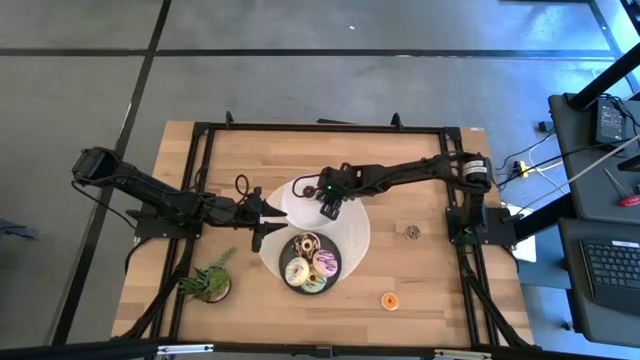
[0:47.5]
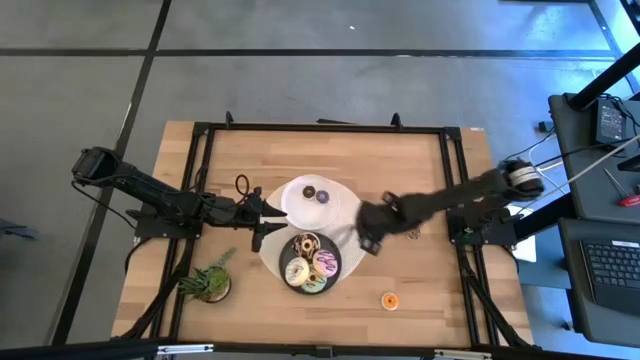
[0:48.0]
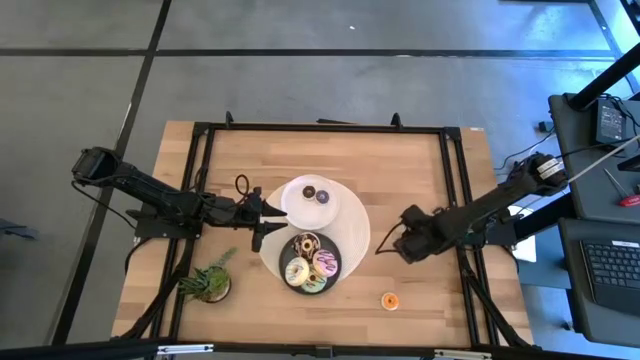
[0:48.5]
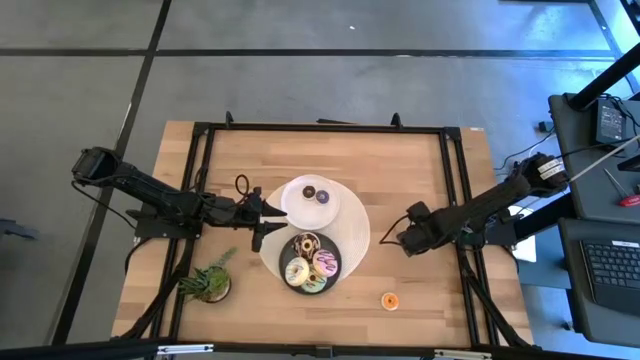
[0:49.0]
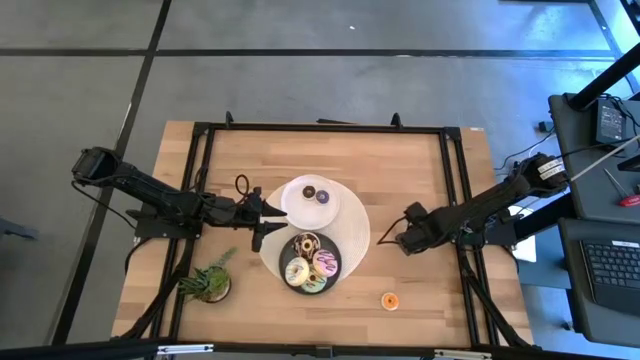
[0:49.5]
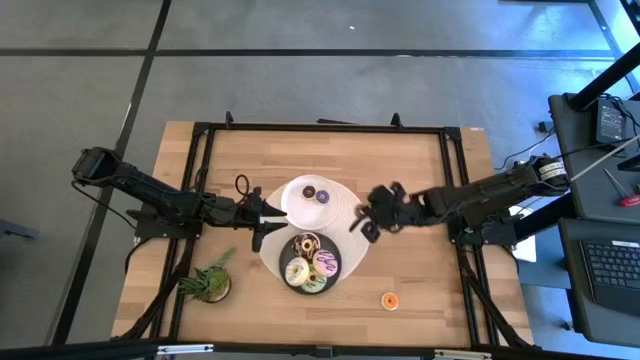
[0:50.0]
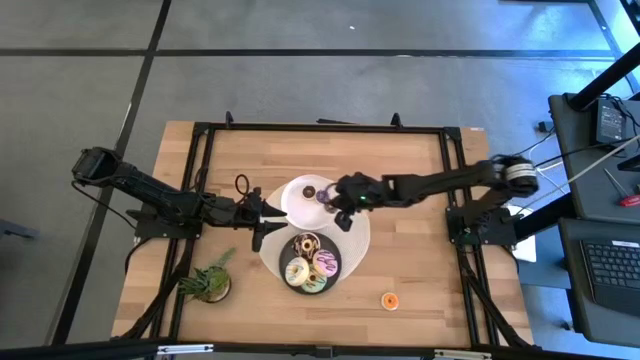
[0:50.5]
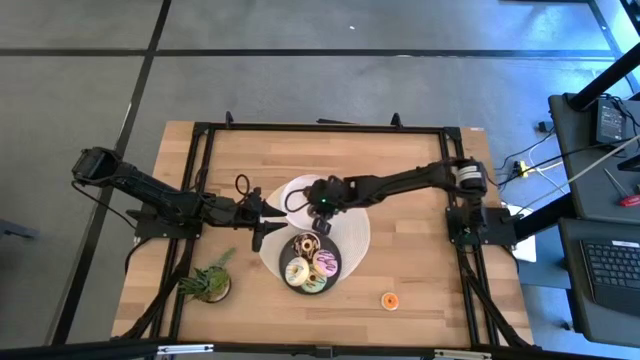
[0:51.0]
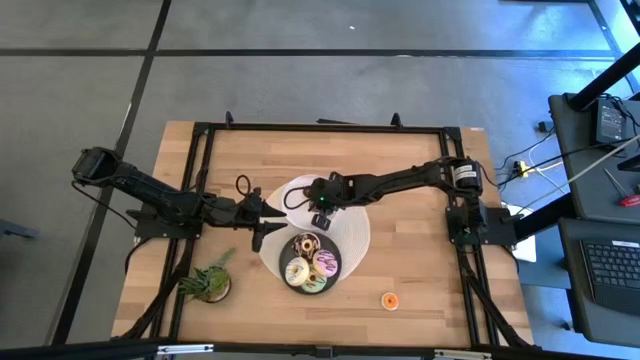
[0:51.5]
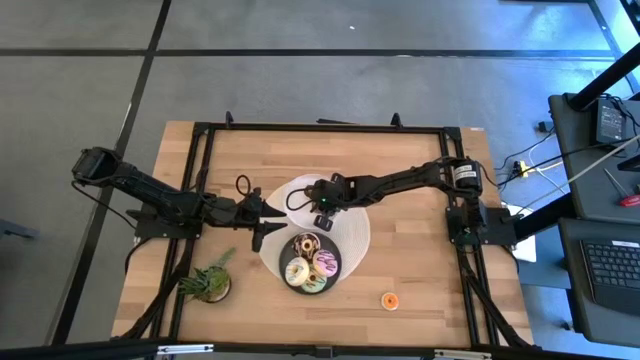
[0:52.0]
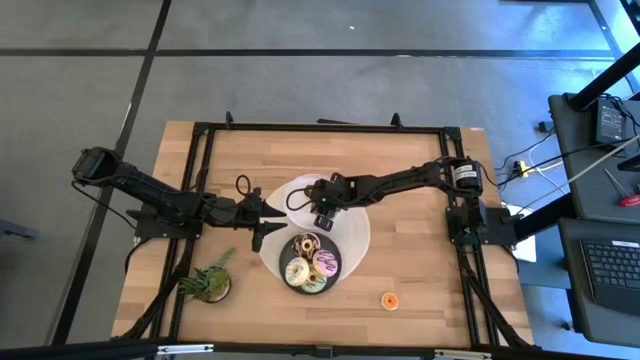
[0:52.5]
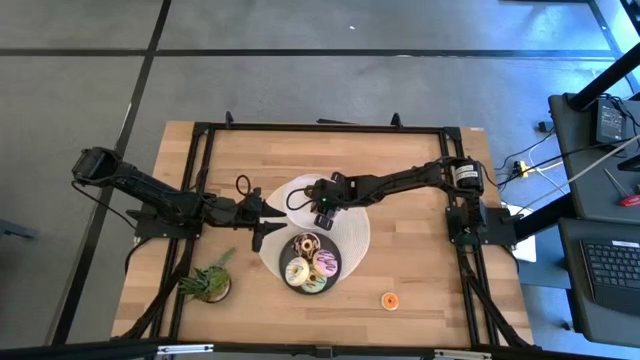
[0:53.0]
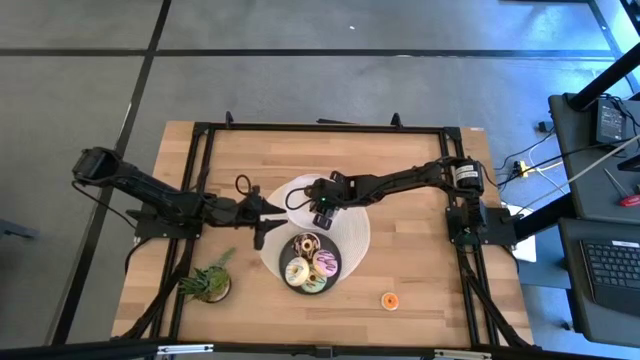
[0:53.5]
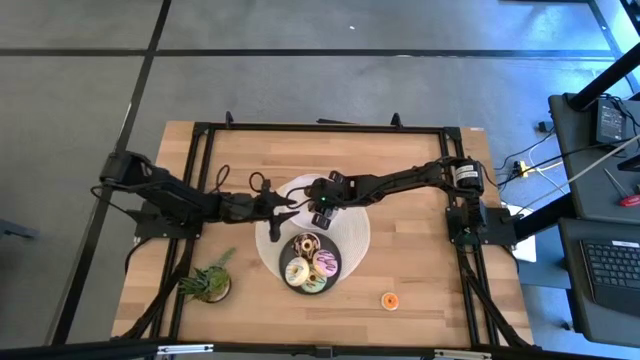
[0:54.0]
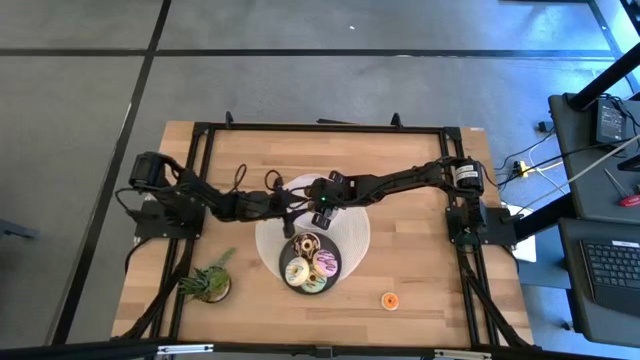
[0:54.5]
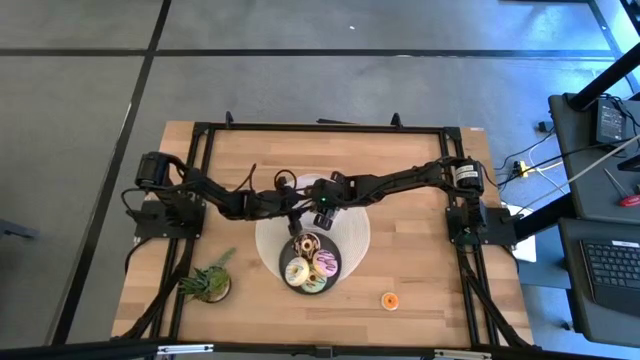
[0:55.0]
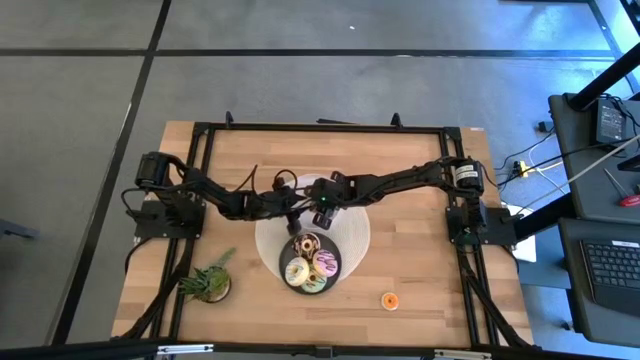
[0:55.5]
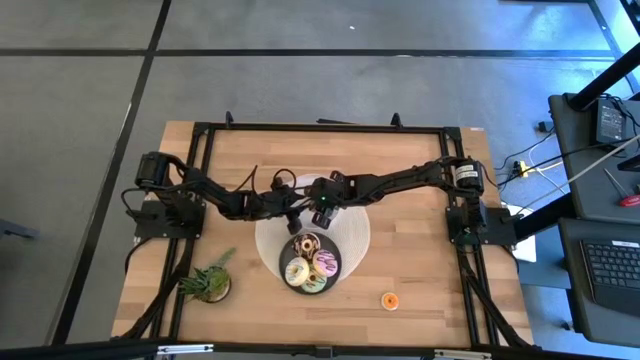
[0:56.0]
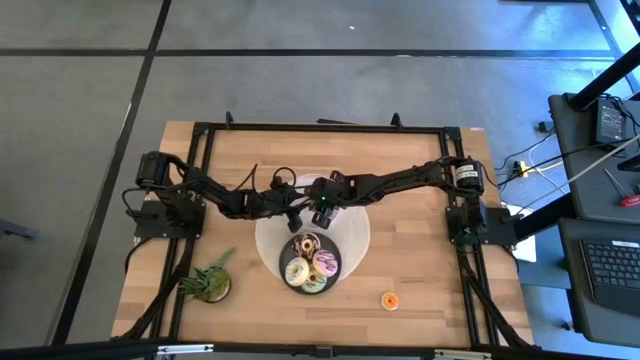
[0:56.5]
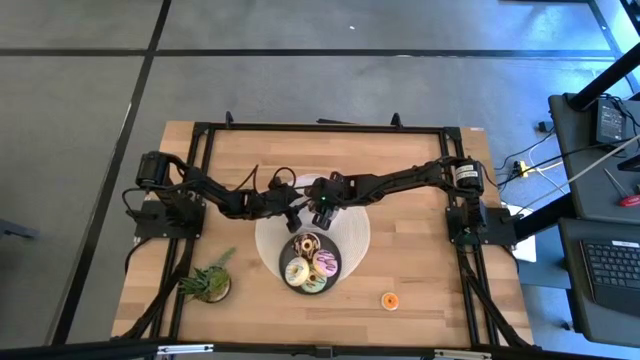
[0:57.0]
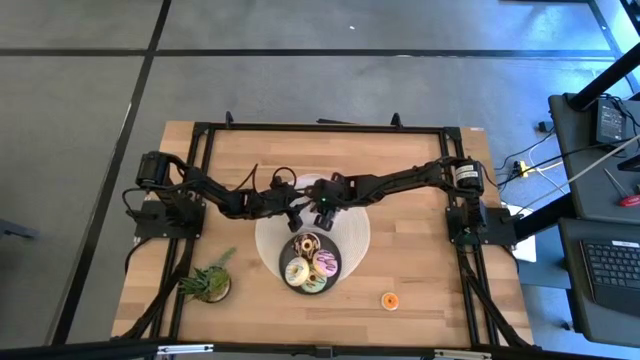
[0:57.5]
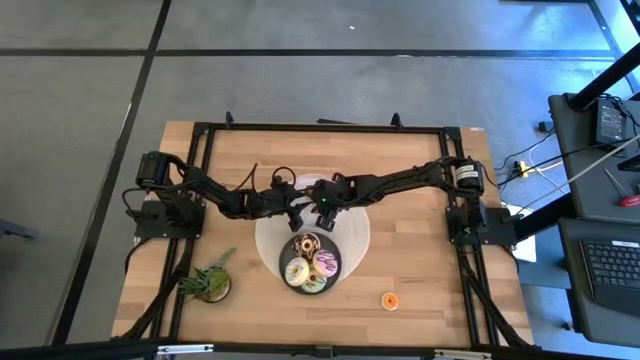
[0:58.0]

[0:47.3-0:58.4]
Task: Pick & Place donuts
Put the small brown donut on the white plate

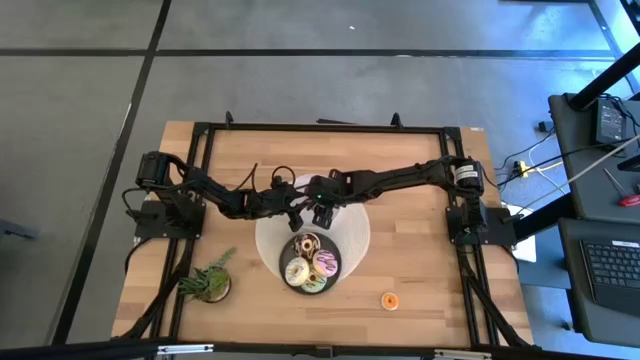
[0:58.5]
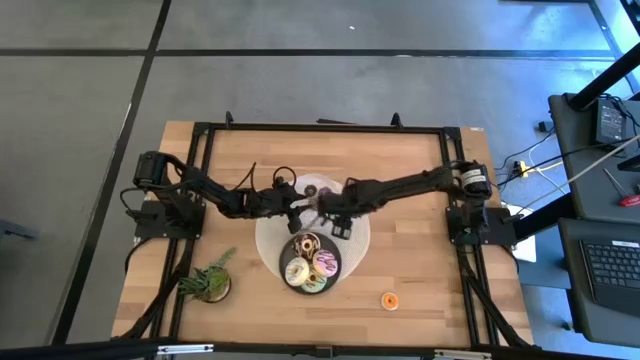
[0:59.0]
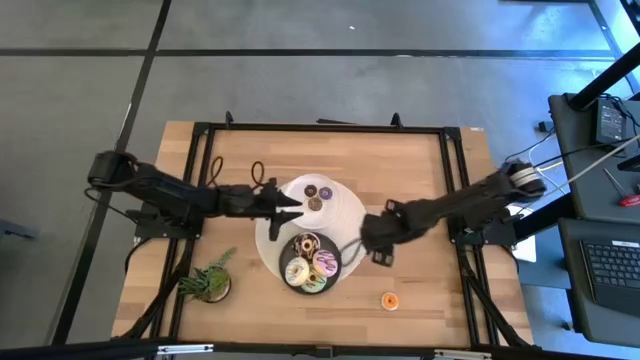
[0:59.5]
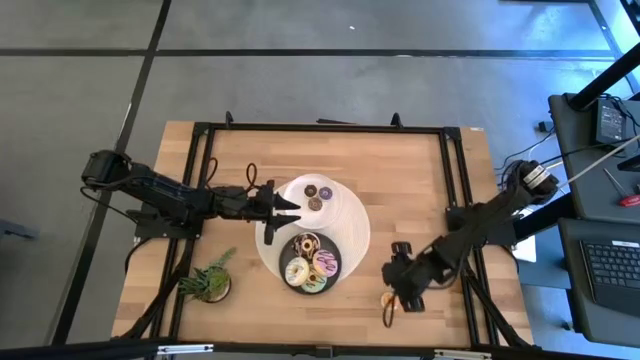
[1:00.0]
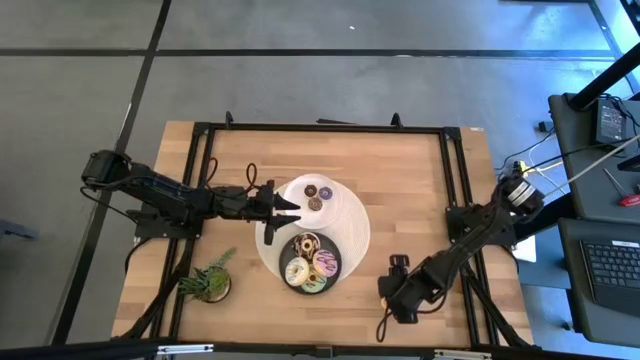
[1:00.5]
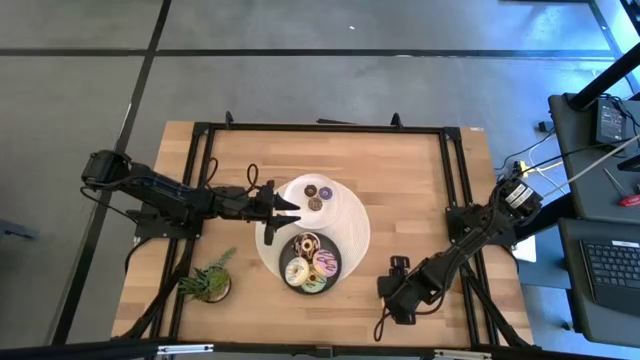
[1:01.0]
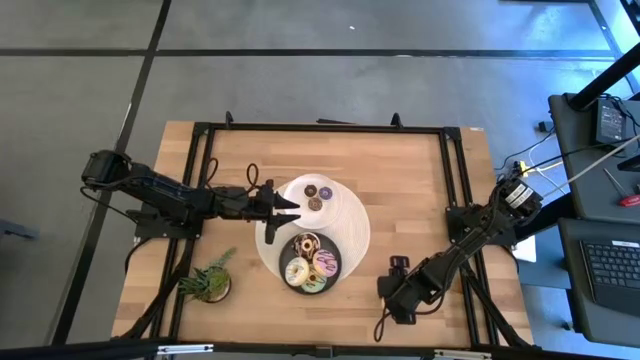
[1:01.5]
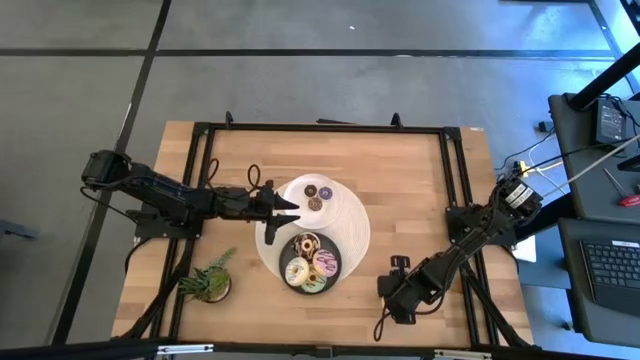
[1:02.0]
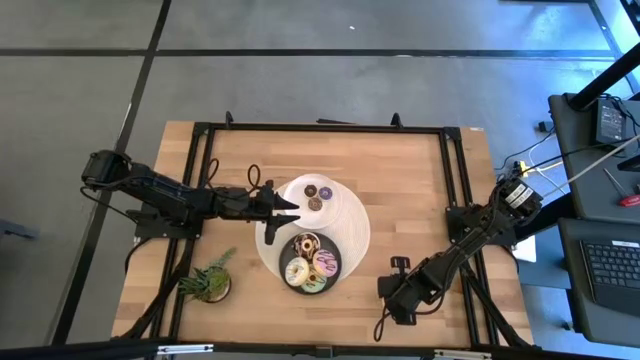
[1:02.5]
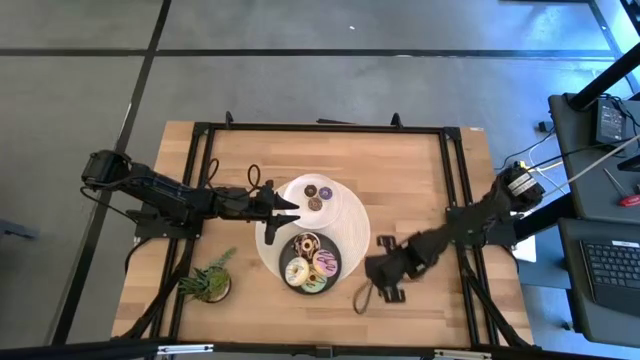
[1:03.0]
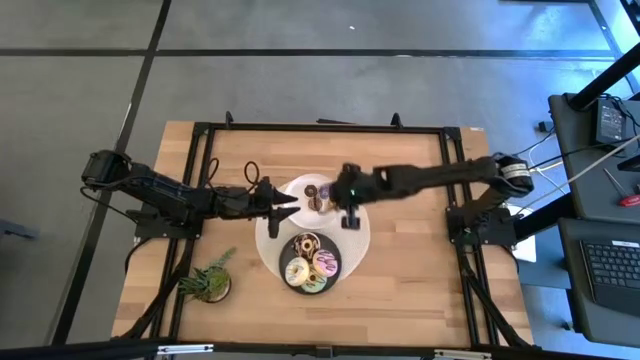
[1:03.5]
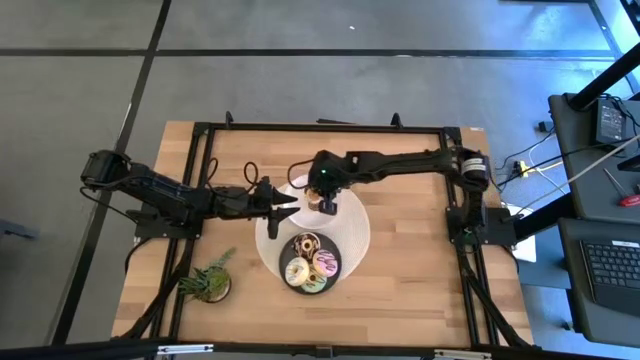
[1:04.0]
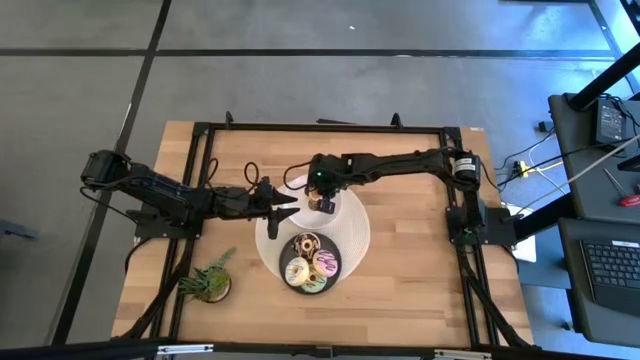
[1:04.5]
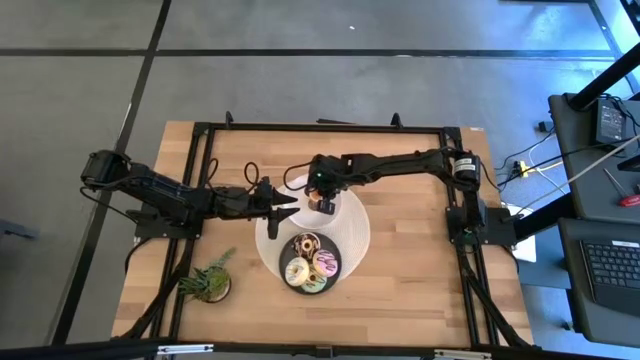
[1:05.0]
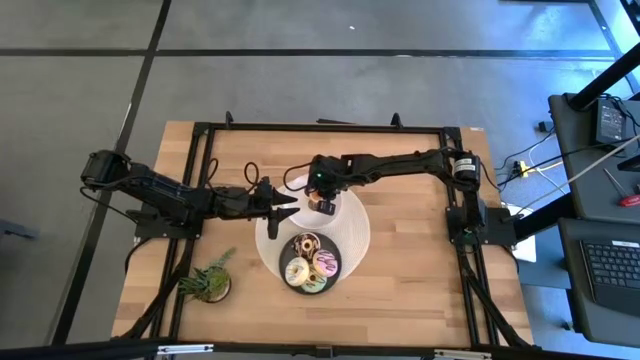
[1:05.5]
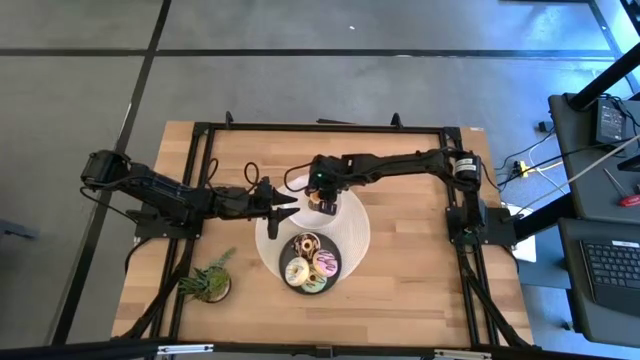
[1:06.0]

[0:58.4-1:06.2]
Put the small orange donut on the white plate

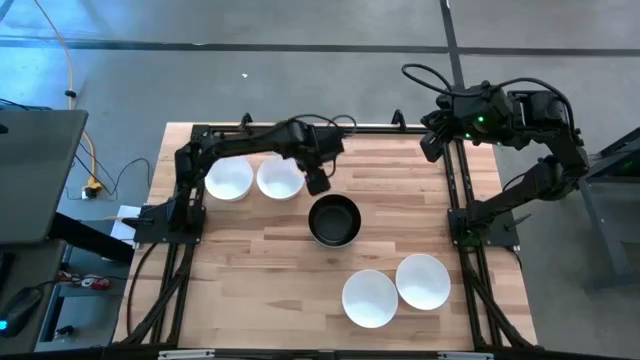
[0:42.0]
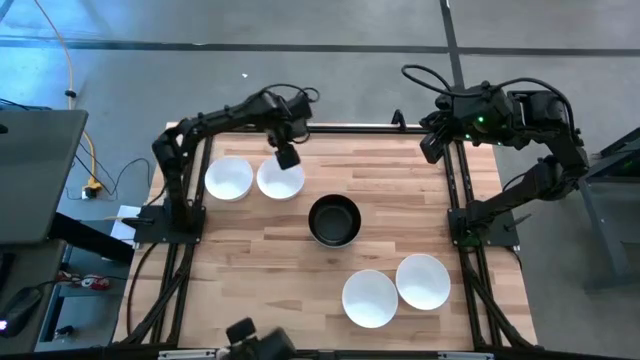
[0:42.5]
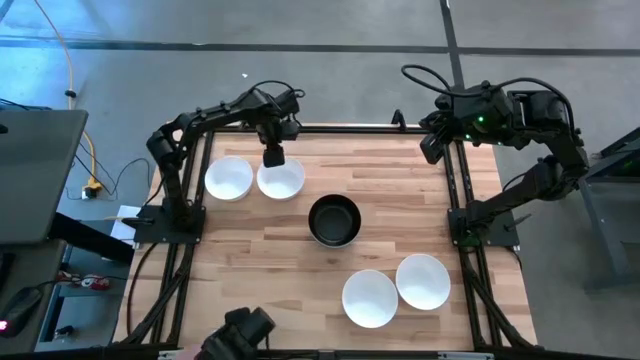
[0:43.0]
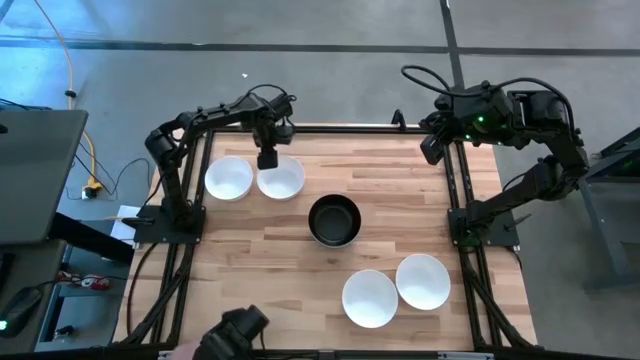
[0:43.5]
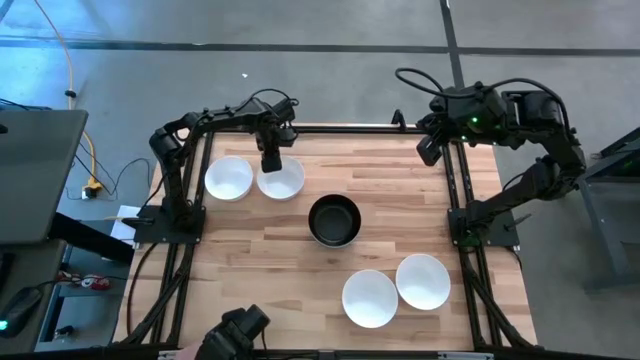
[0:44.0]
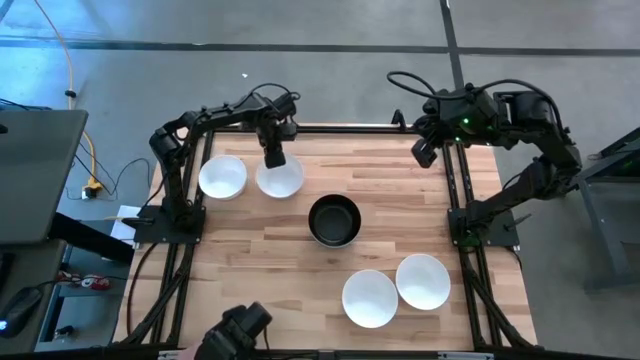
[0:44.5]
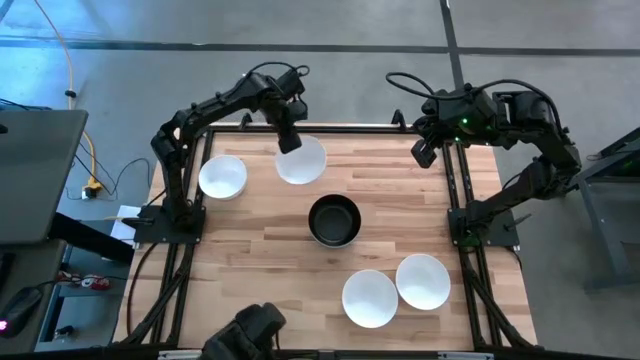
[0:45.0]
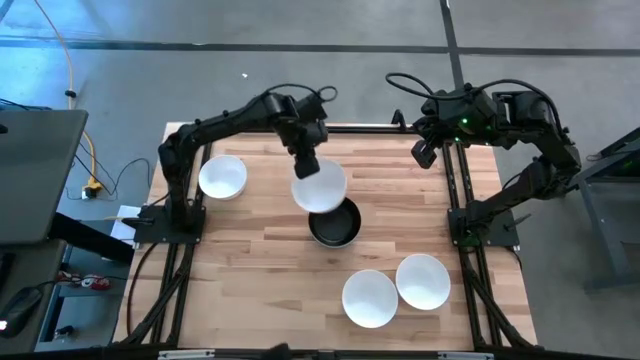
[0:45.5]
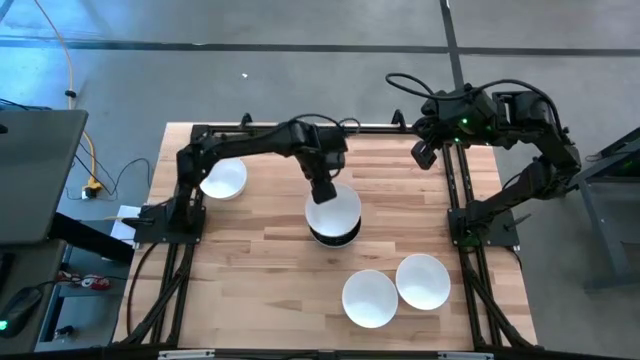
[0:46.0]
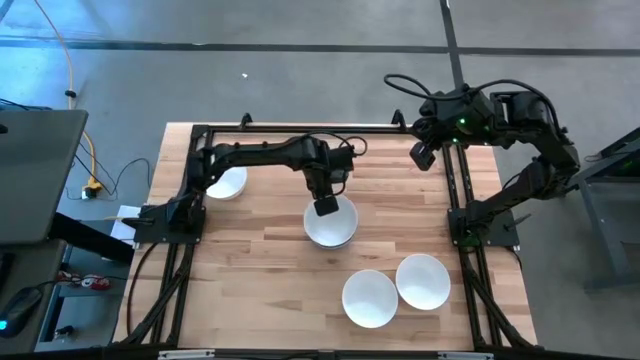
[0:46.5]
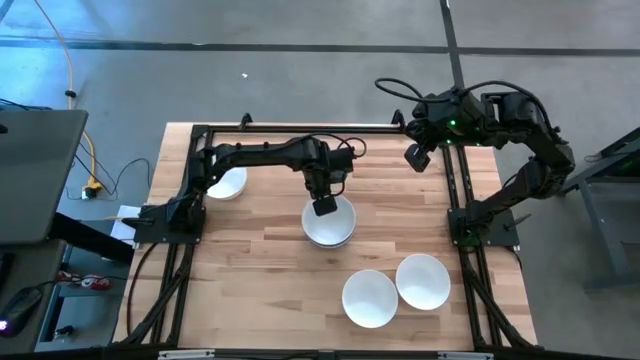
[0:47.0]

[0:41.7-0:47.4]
Task: Nest bowls inside each other
Stack the white bowl on top of the black bowl
